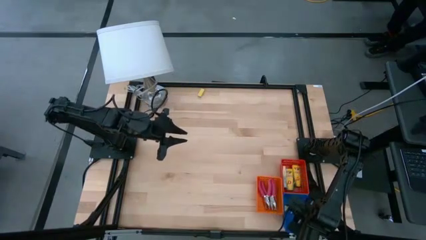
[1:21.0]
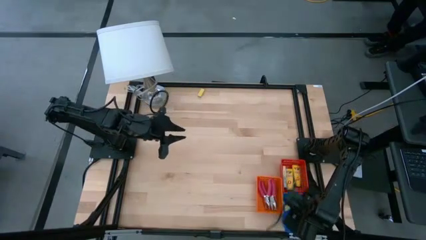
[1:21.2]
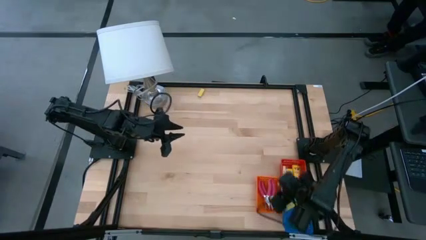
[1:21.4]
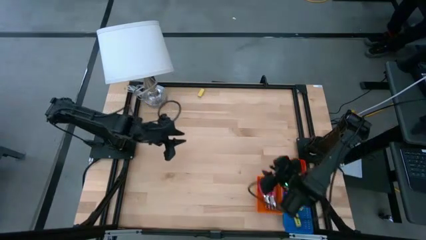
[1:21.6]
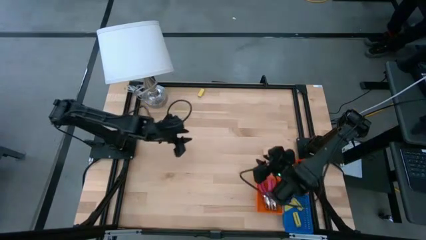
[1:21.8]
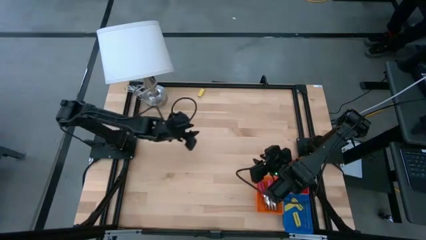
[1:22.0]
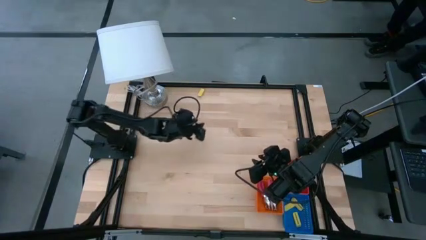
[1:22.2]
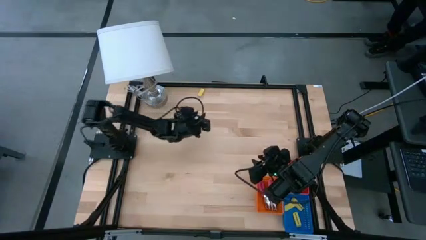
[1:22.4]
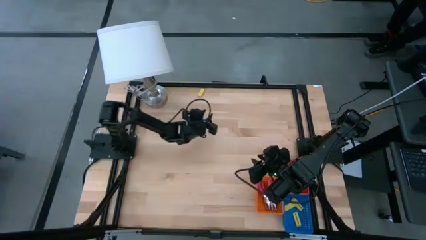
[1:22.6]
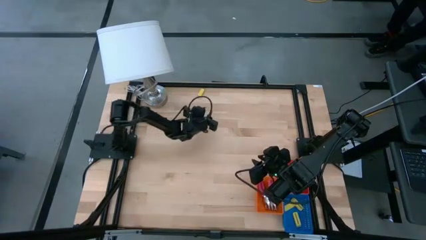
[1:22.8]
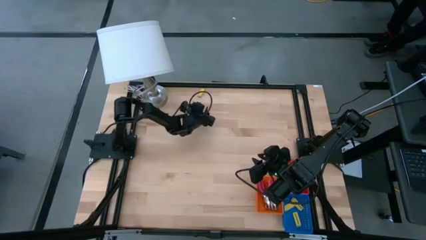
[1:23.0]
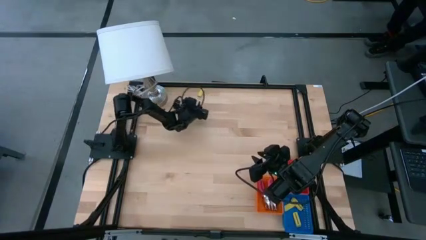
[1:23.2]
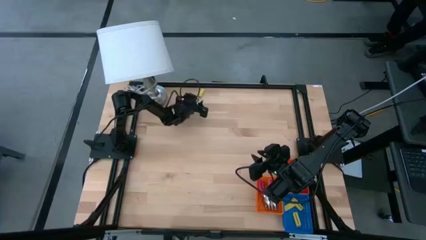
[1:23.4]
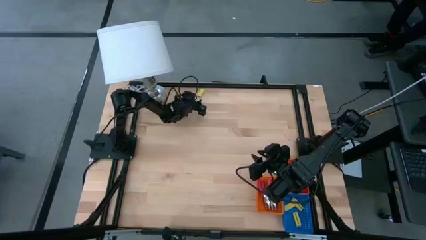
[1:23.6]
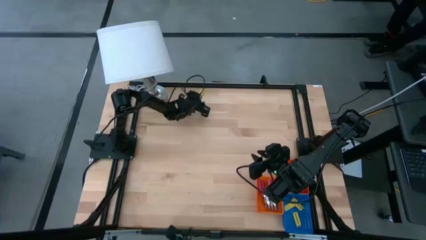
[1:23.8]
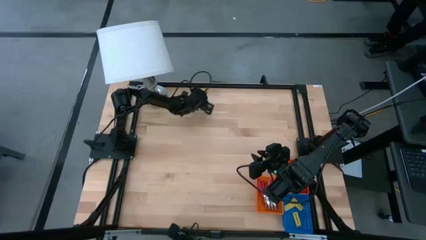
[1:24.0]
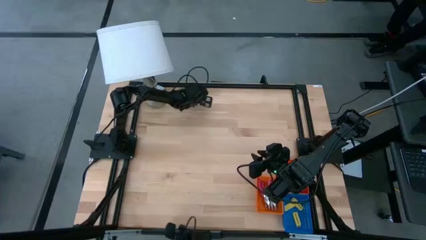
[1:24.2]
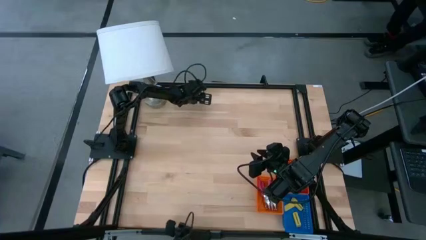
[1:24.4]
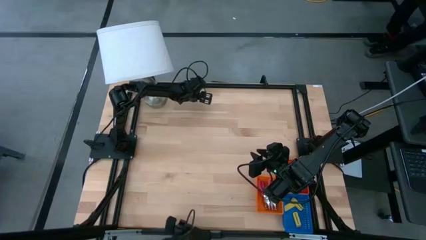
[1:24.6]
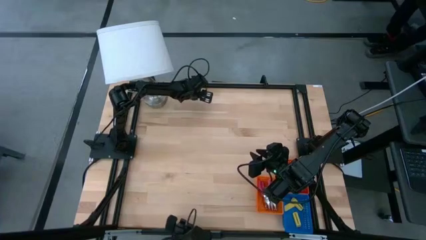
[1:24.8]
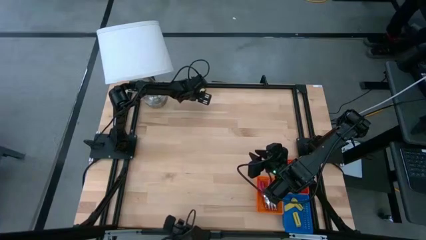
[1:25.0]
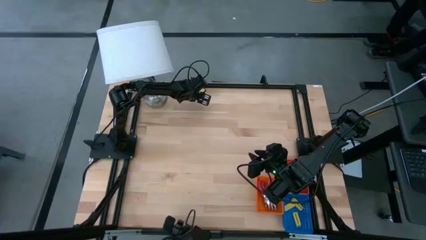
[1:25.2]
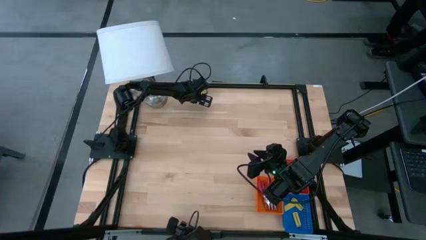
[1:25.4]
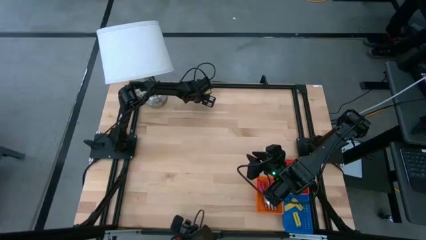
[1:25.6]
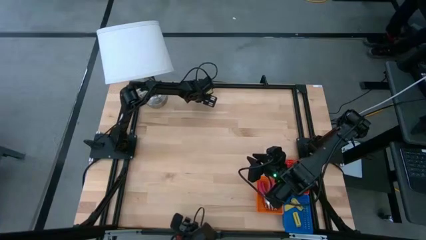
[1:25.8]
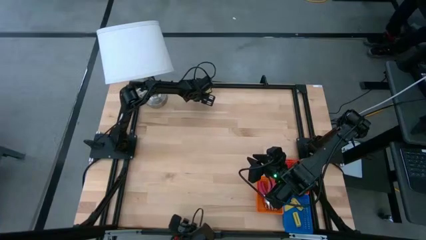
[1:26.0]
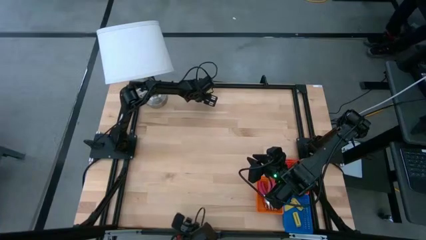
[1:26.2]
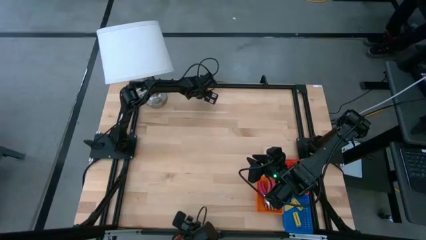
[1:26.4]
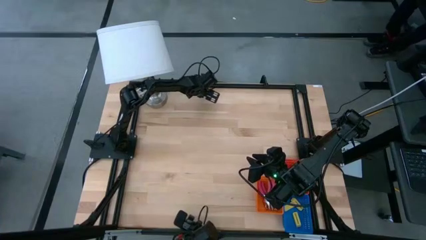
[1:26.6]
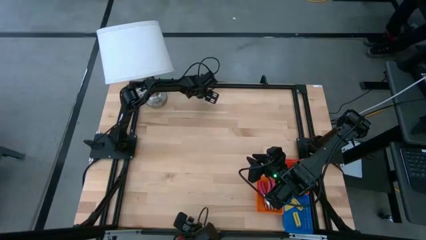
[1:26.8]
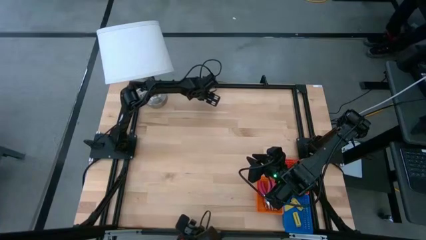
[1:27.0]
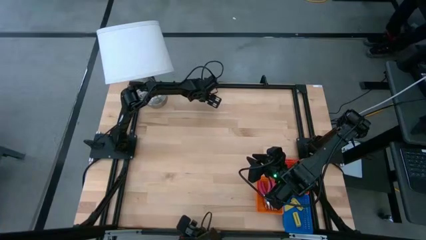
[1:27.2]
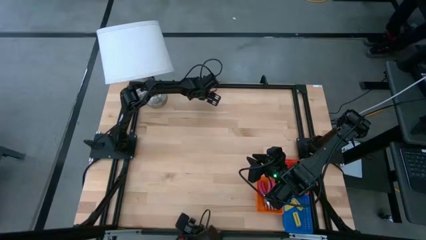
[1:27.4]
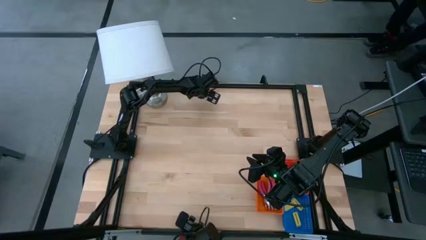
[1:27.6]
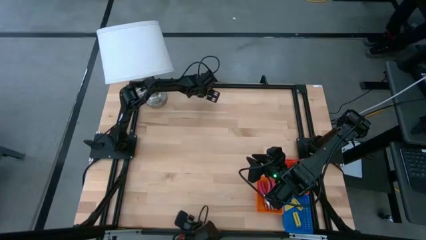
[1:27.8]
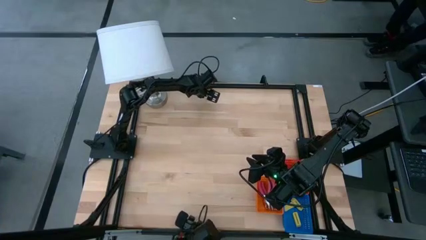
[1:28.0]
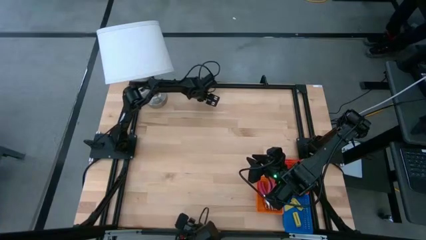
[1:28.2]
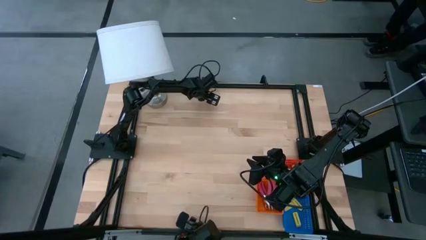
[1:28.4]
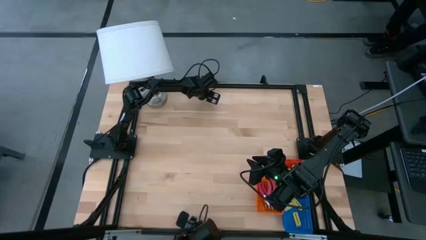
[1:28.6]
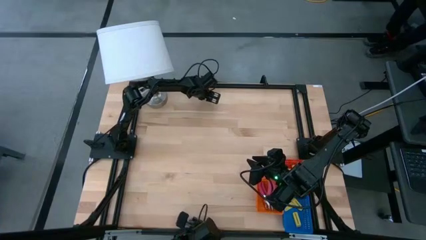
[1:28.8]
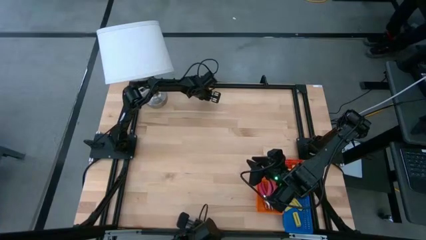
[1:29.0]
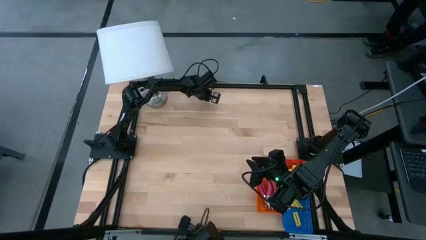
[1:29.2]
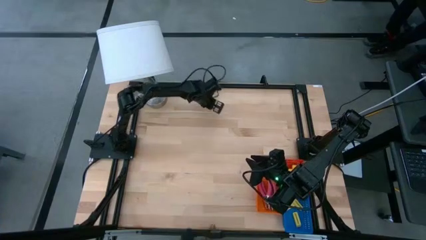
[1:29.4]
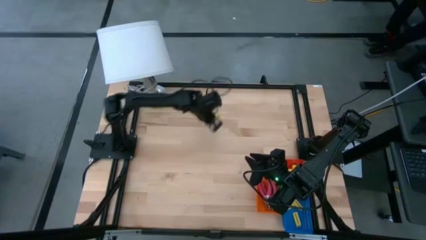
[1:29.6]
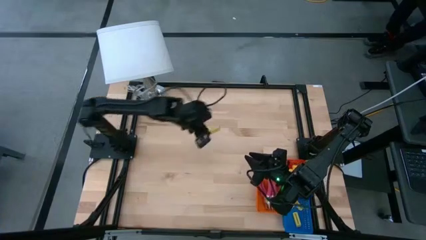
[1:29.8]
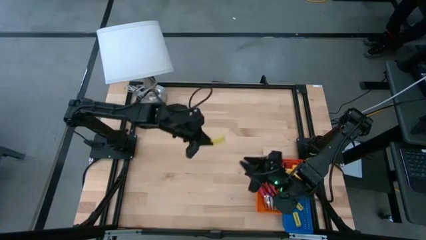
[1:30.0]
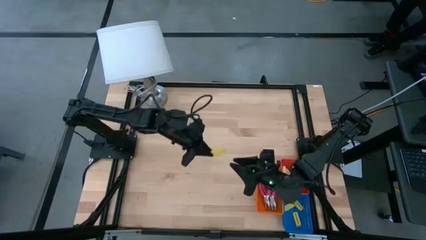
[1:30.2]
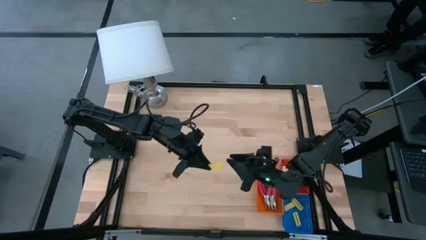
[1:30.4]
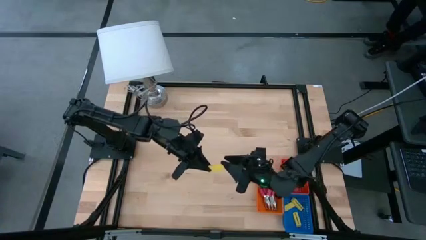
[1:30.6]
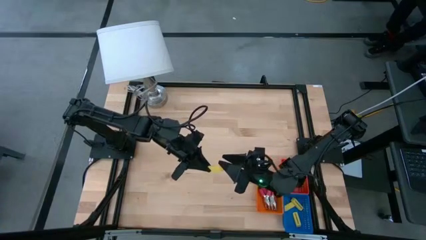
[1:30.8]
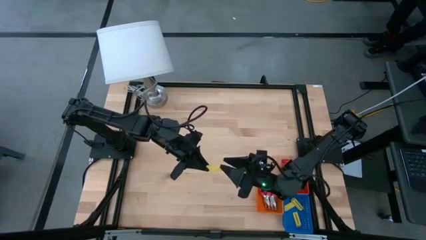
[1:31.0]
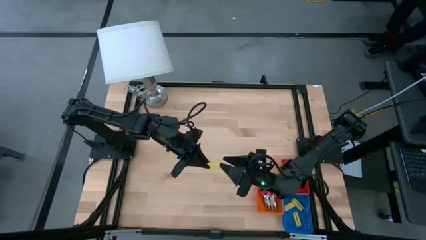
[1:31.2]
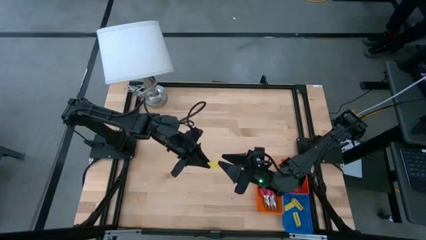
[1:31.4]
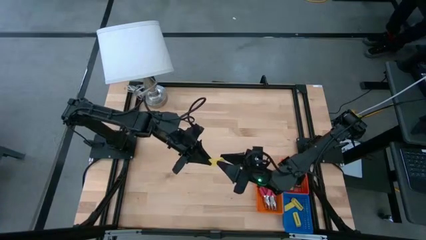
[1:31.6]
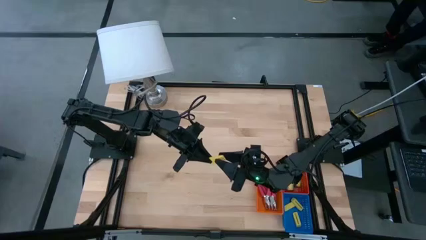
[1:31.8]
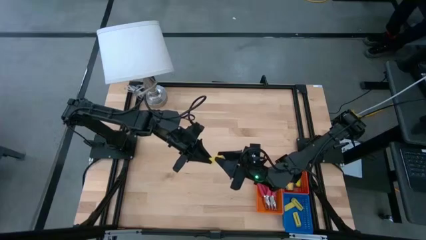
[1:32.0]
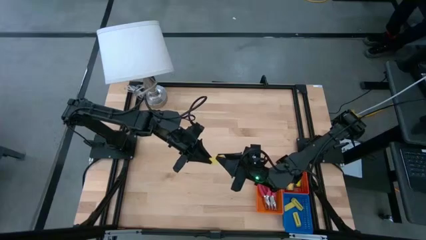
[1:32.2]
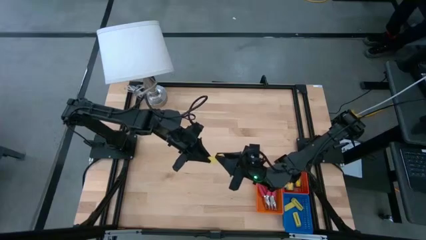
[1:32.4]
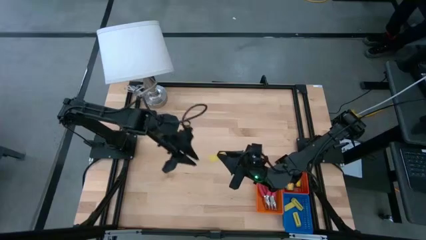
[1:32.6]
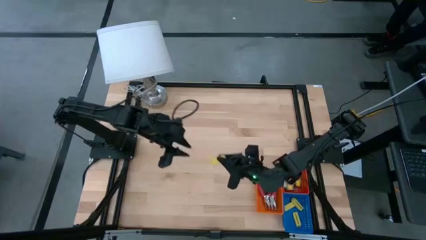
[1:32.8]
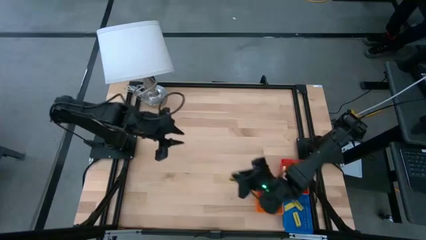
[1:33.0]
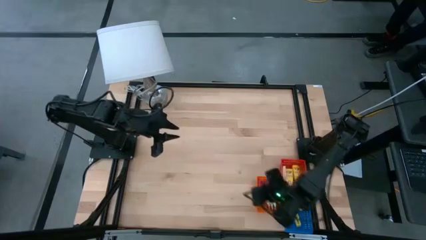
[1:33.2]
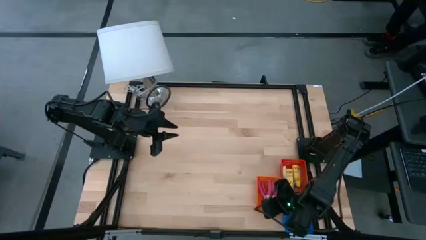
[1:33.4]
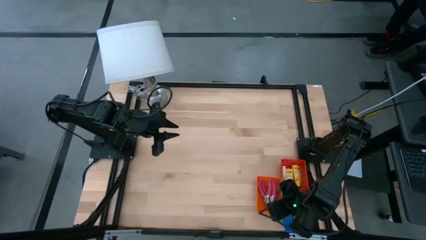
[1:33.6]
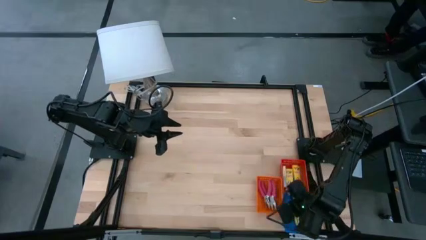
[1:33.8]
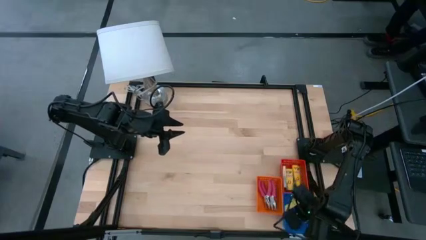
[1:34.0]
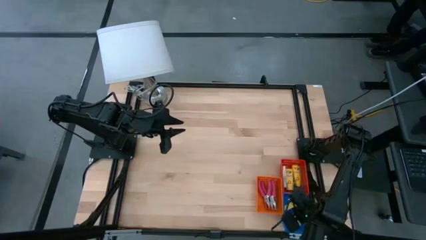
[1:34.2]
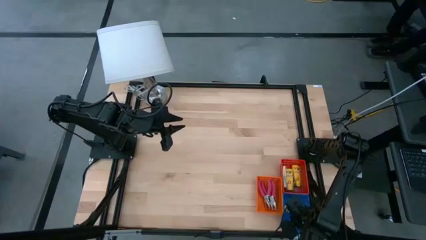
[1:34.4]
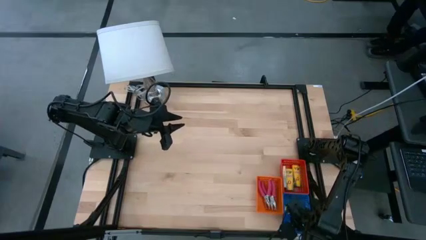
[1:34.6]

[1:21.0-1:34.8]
Task: Pick & Place School Supplies
Put the yellow eraser into the blue basket

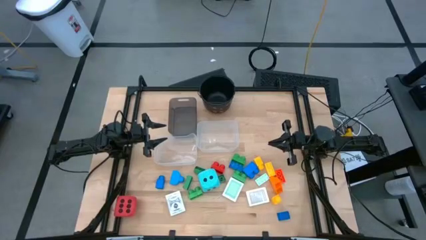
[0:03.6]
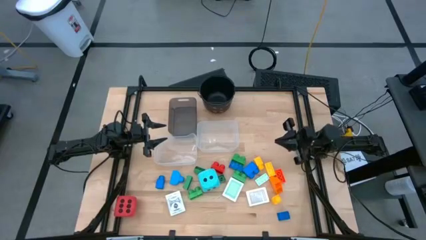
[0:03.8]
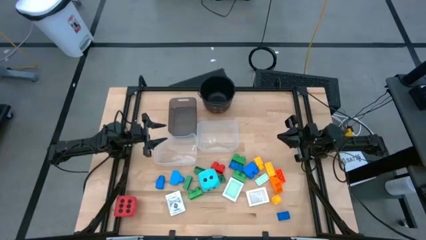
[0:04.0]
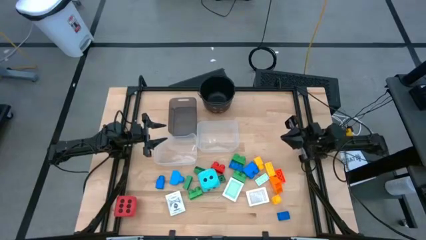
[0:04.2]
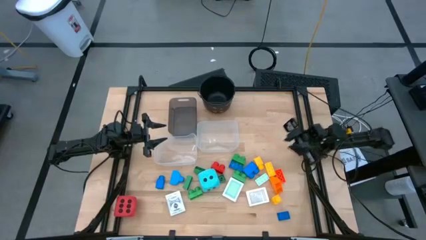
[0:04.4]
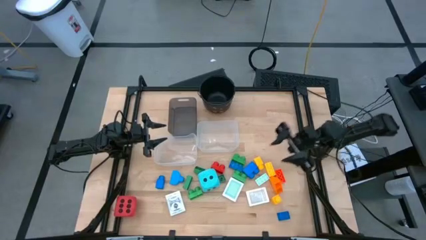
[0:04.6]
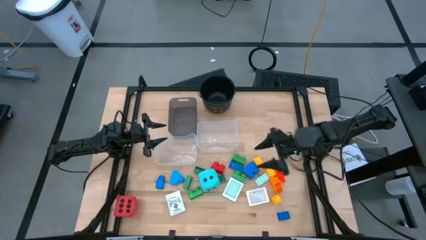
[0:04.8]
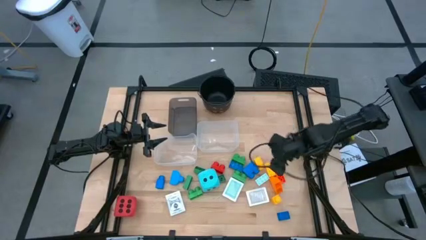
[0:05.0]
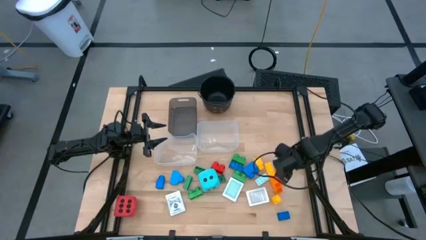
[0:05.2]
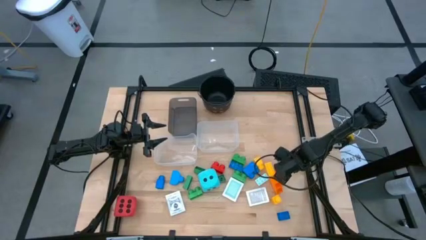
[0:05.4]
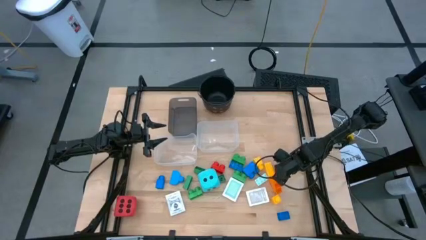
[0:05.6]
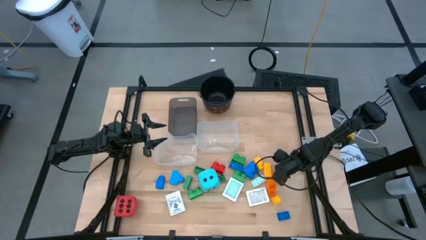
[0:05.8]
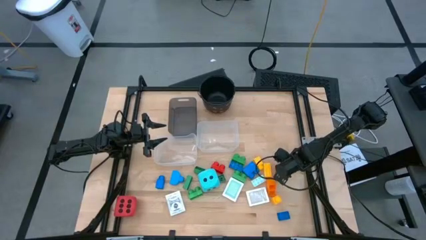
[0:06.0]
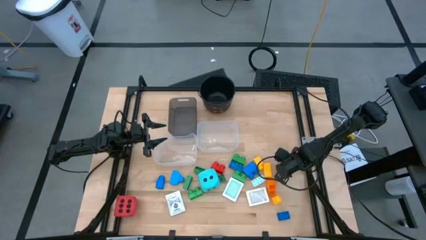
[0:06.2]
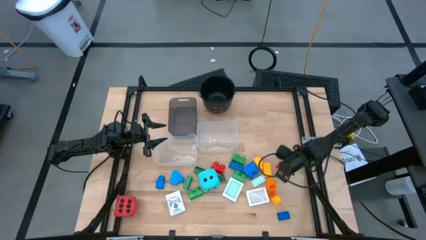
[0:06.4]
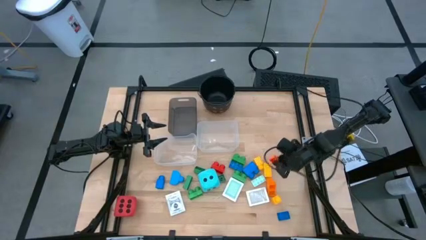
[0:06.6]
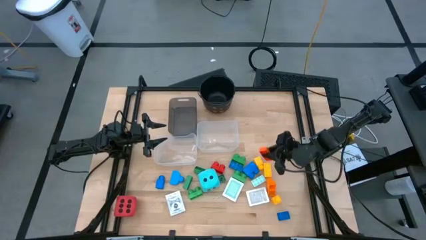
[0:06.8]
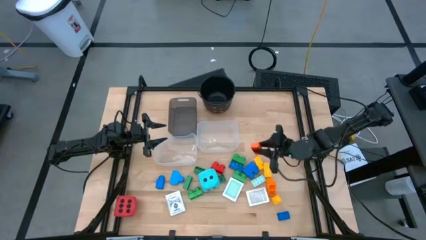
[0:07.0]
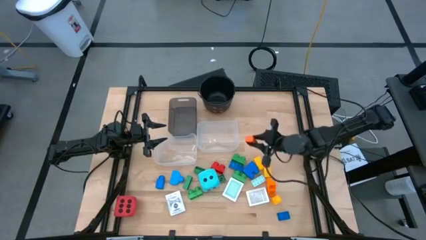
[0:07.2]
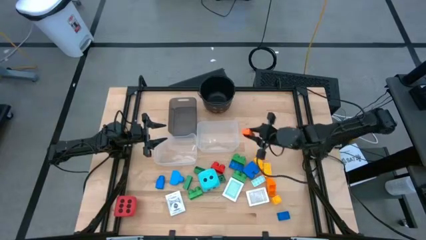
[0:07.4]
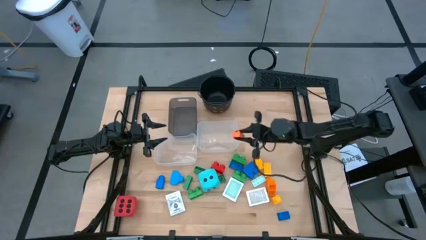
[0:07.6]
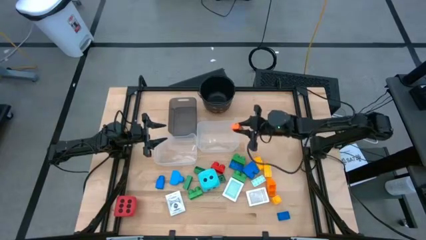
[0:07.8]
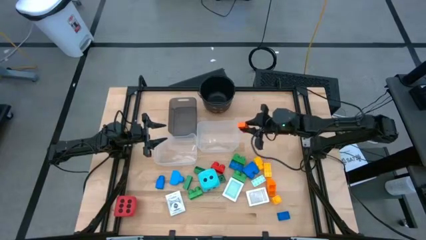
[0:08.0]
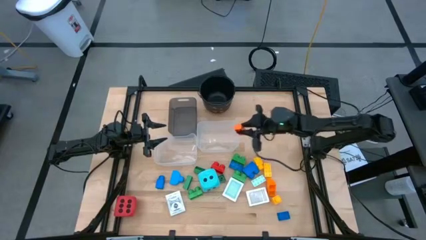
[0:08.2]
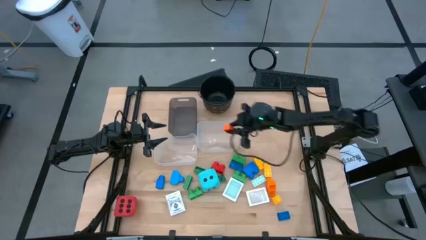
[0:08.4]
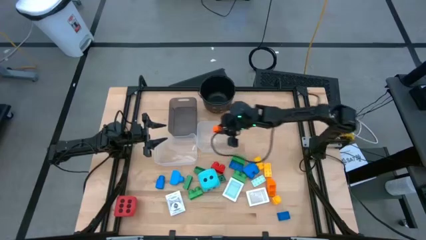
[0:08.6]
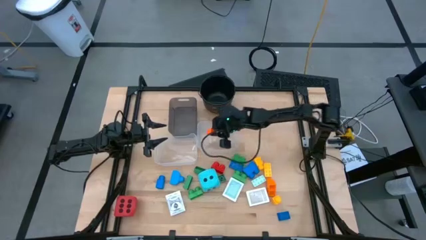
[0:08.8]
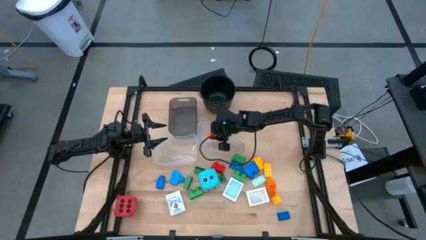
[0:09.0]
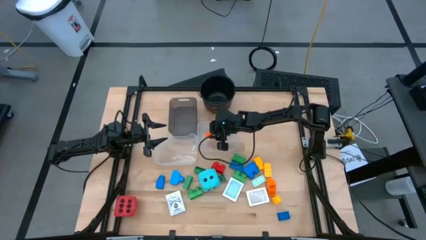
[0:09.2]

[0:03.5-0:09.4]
Task: Pick & Place Toys
Put the orange game piece into the right transparent bin
